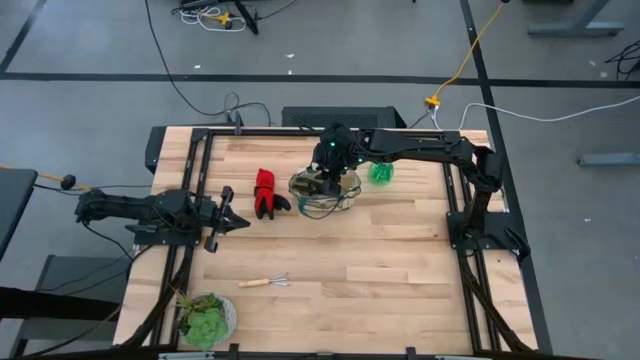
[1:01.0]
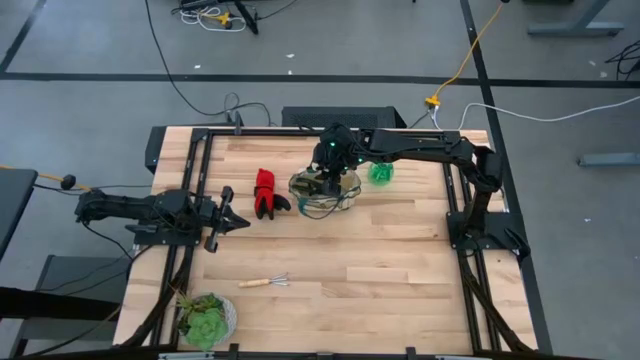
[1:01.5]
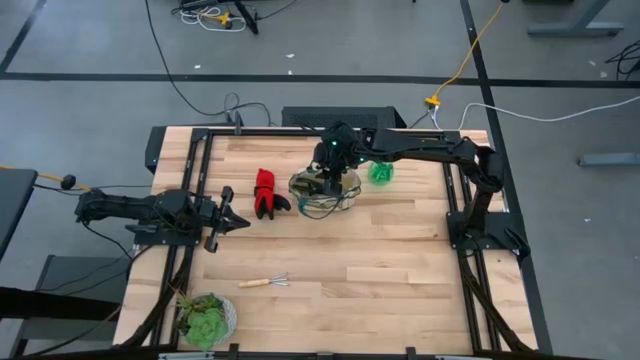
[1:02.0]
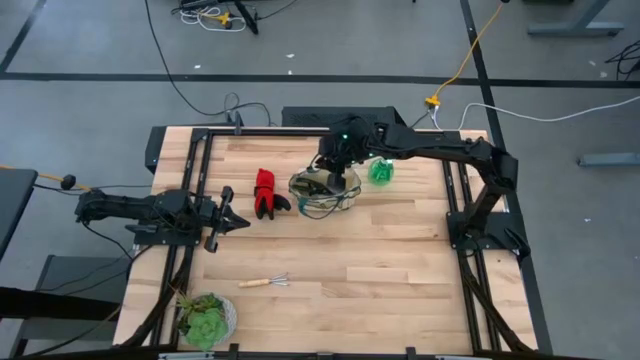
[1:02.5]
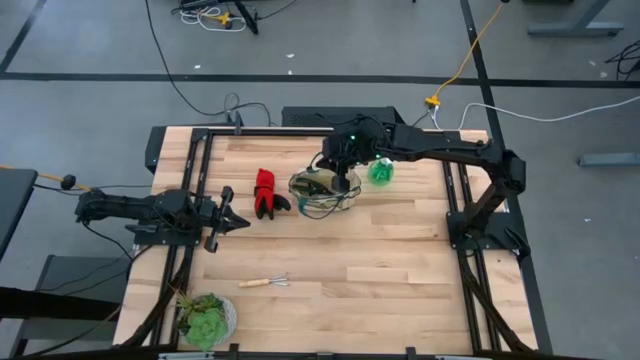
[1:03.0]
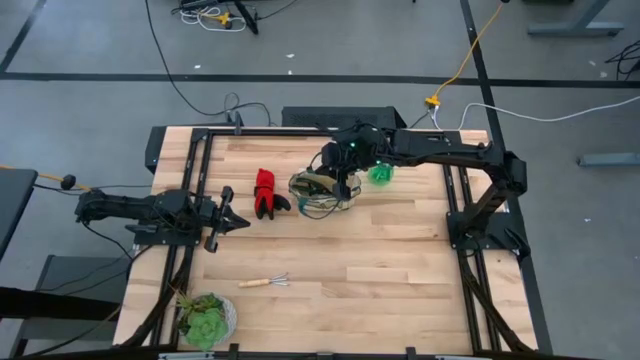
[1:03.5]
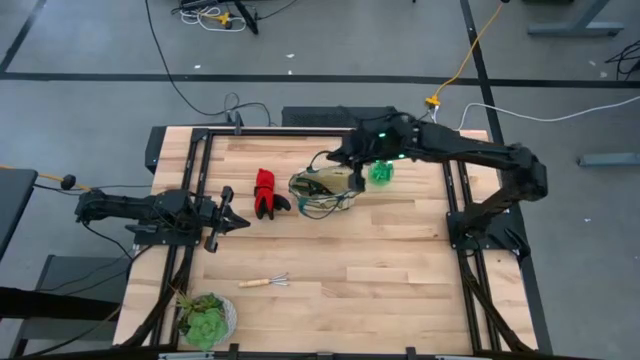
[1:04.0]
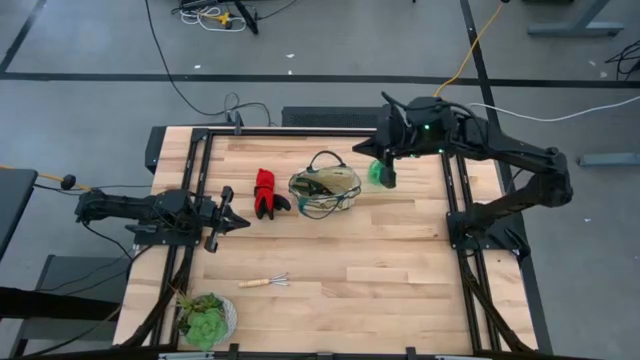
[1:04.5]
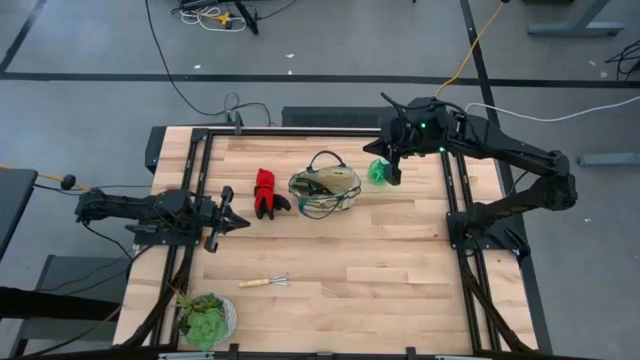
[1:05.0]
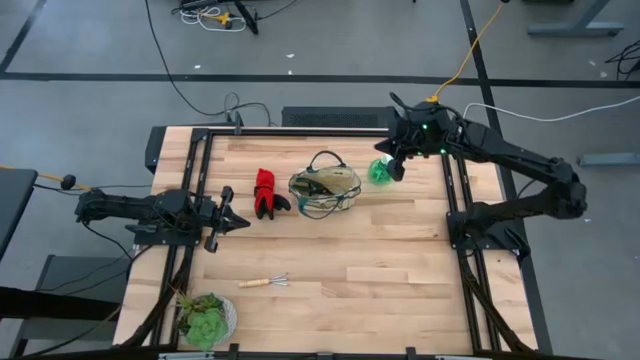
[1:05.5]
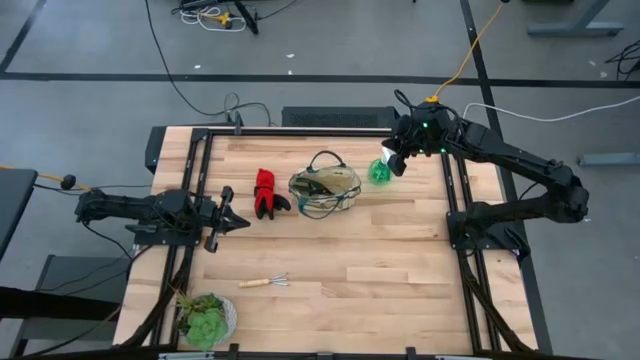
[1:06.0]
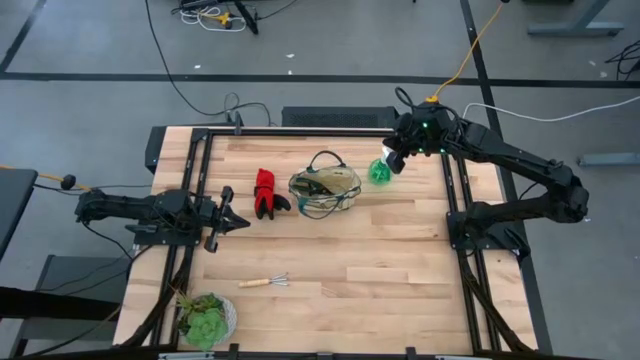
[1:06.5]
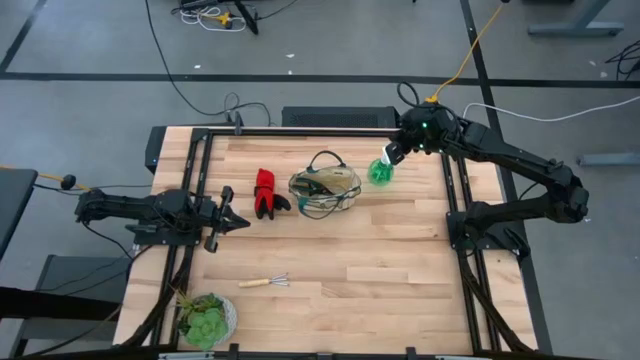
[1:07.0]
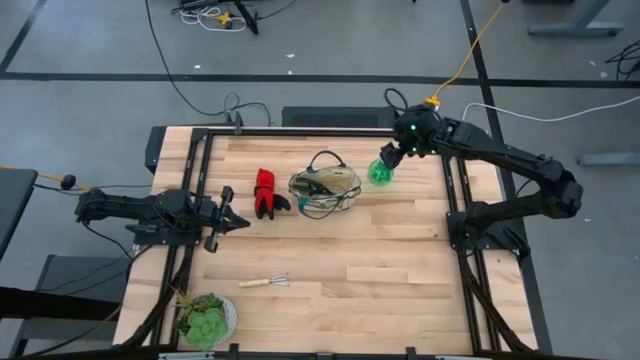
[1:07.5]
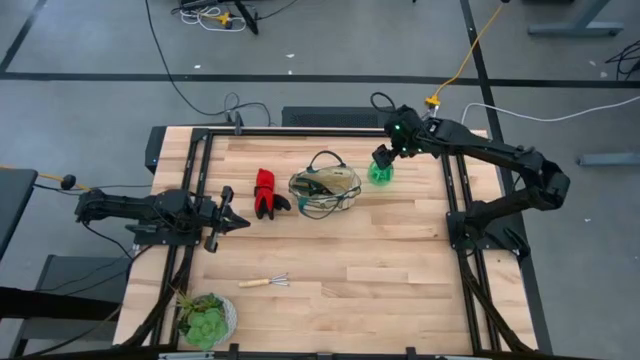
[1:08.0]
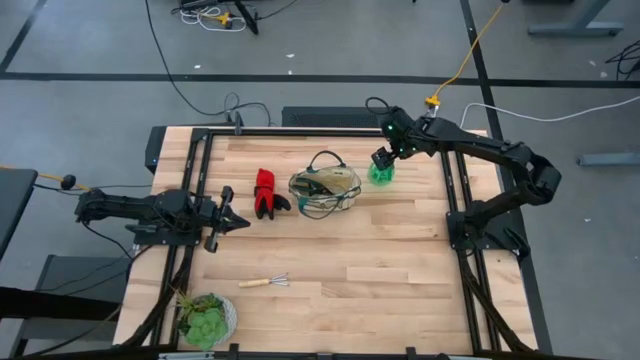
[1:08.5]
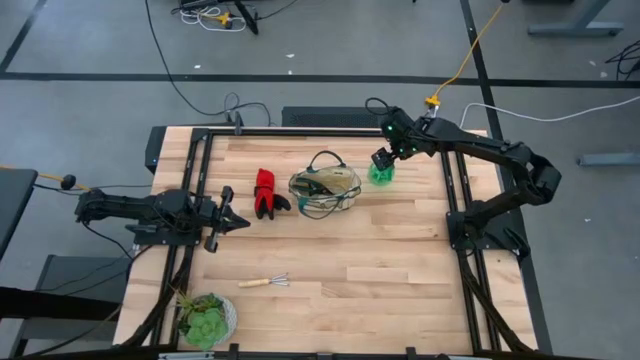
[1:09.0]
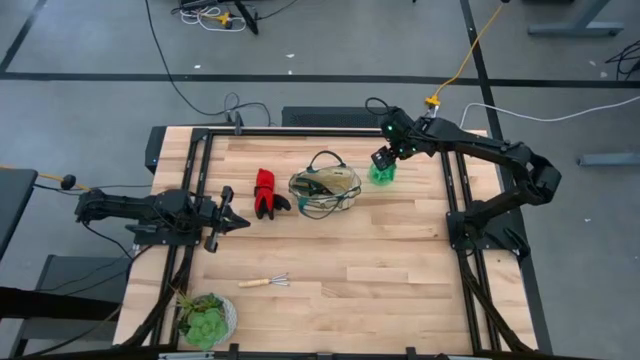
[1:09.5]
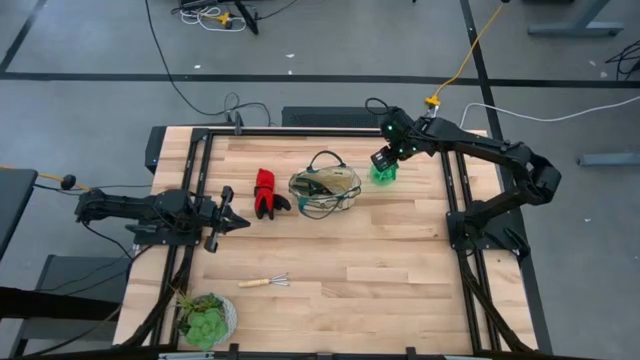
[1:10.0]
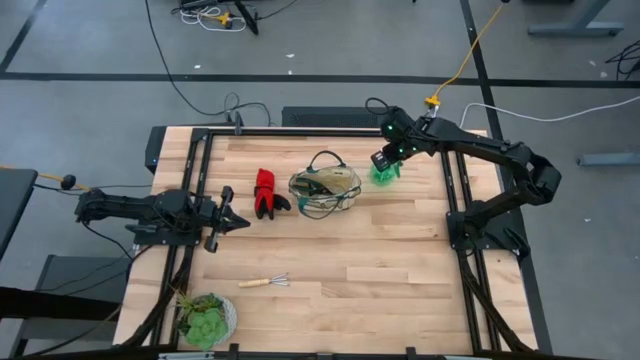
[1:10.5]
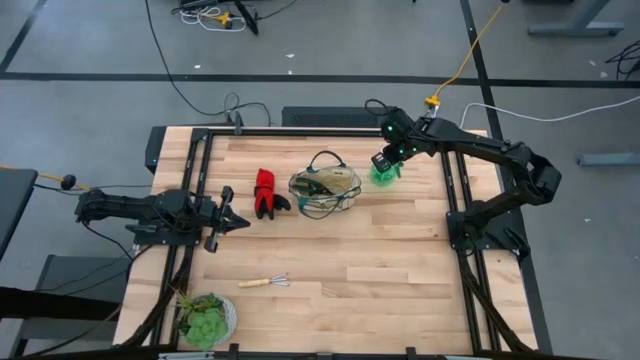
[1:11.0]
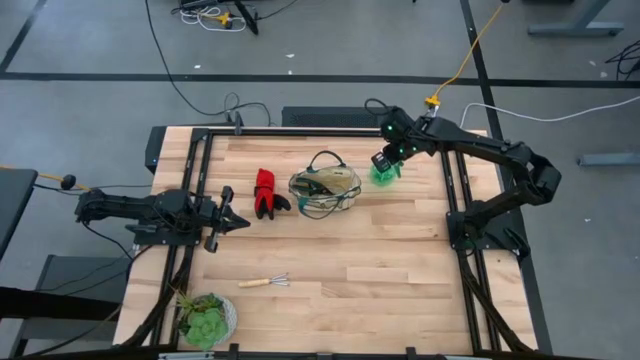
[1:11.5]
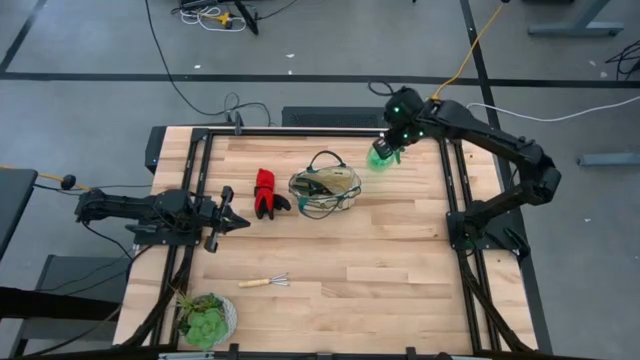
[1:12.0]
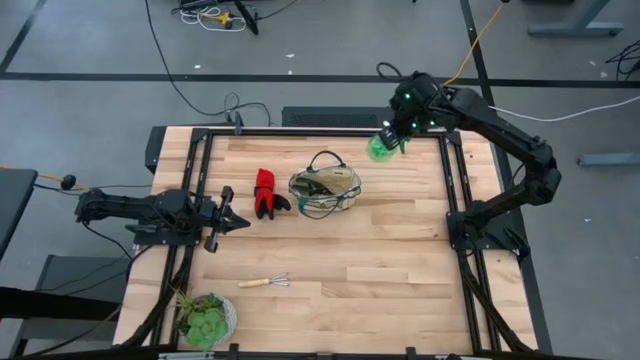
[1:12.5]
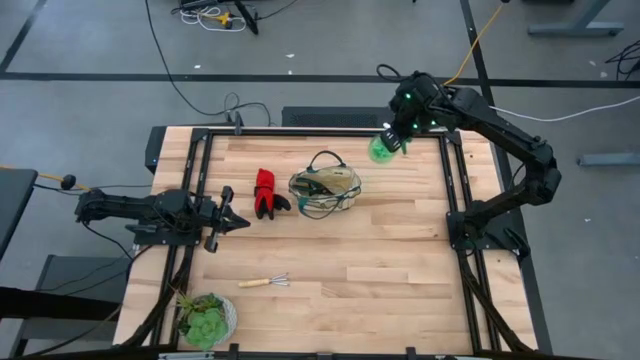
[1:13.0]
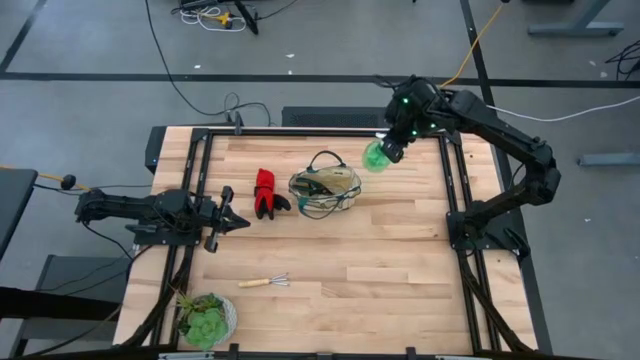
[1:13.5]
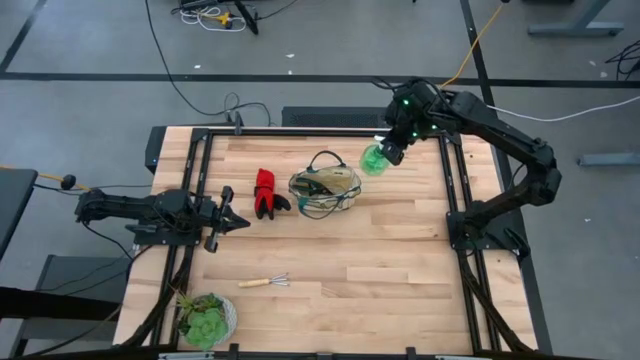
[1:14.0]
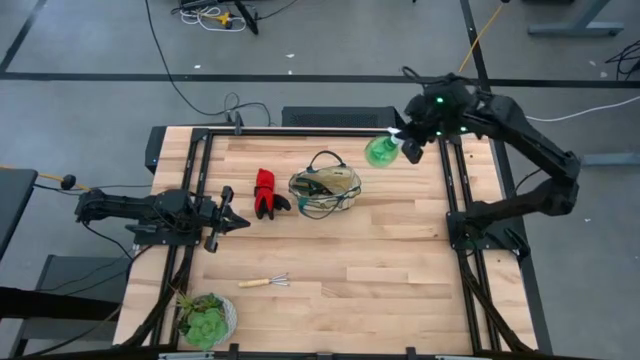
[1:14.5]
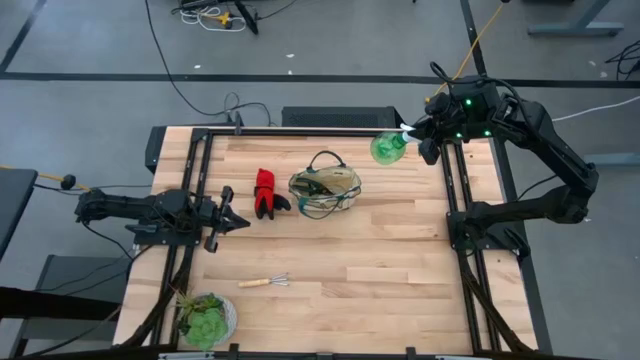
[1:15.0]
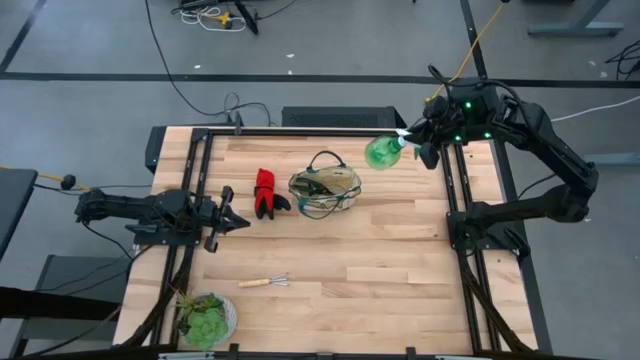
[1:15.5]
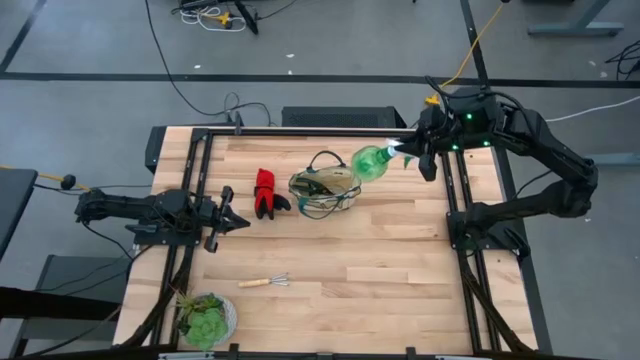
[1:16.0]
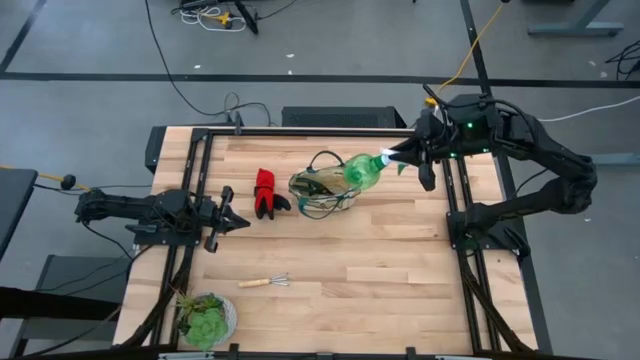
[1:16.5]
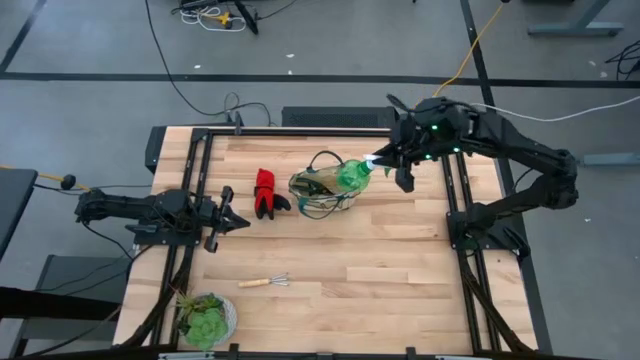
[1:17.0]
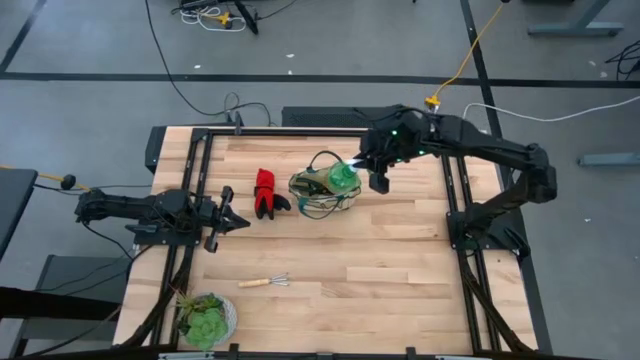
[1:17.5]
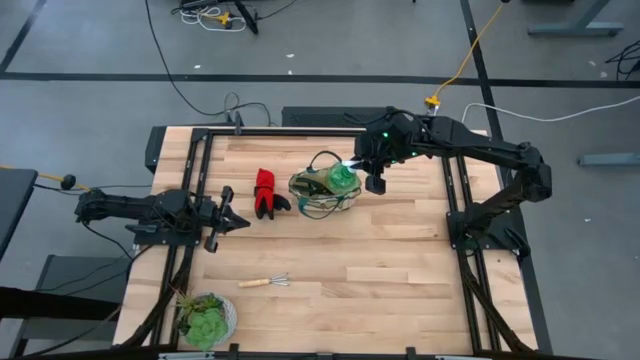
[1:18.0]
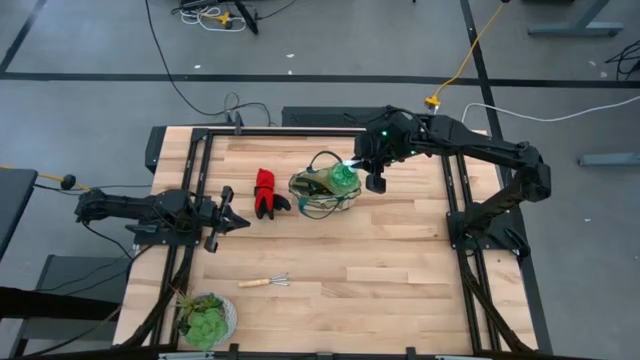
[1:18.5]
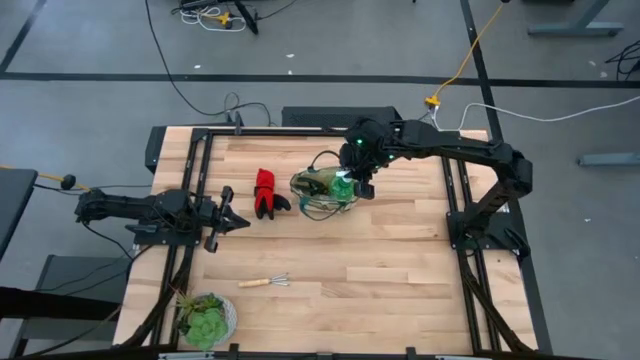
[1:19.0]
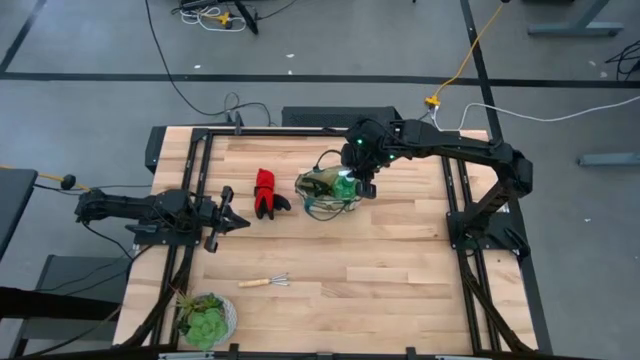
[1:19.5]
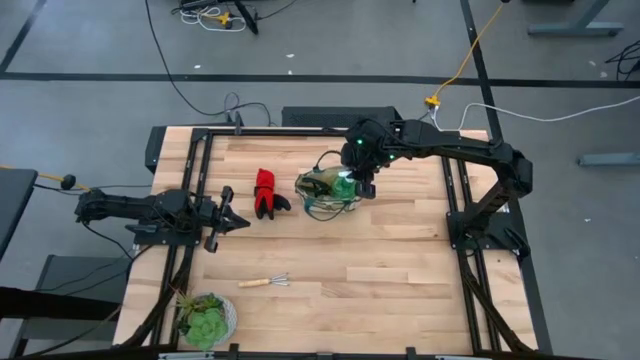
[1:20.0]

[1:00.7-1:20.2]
Task: Pick & Place Garden tools in Gardening bag
Put the white spray bottle into the gardening bag
